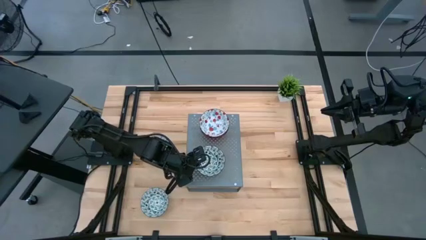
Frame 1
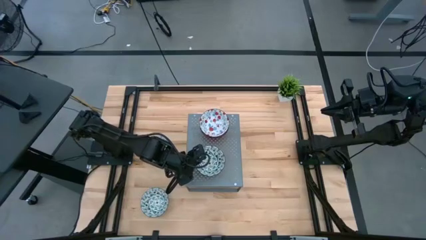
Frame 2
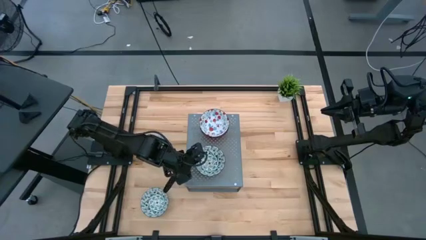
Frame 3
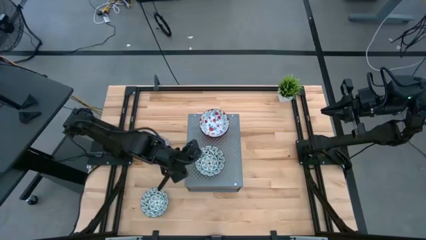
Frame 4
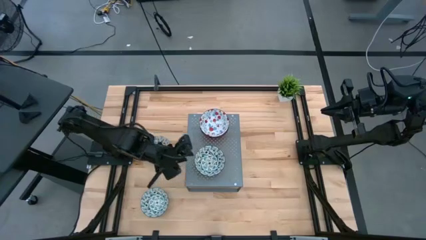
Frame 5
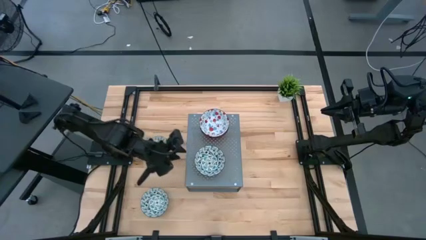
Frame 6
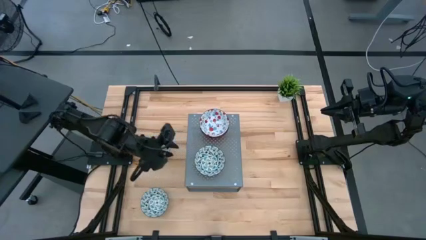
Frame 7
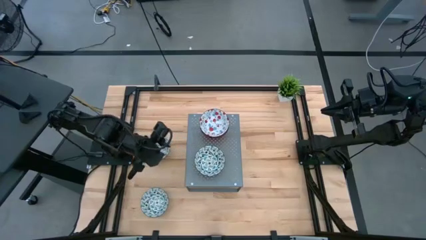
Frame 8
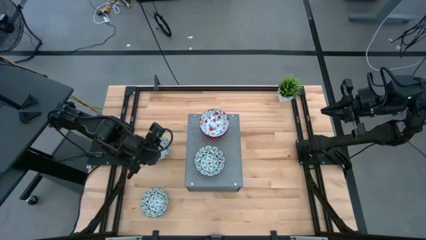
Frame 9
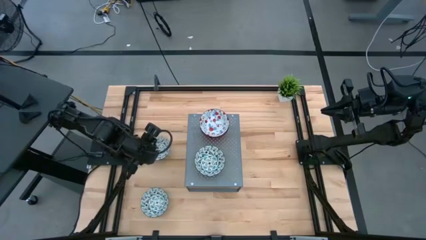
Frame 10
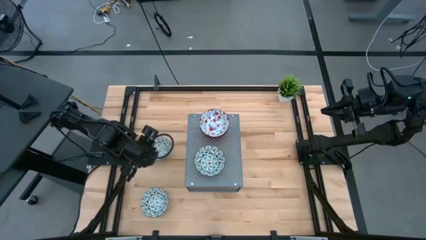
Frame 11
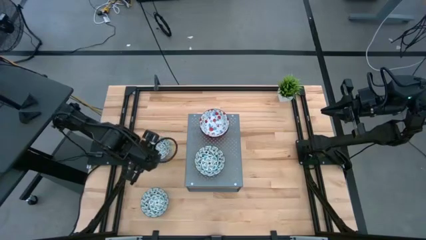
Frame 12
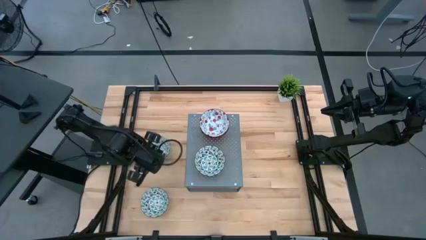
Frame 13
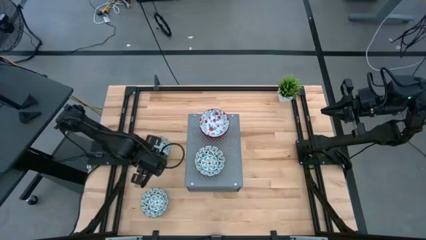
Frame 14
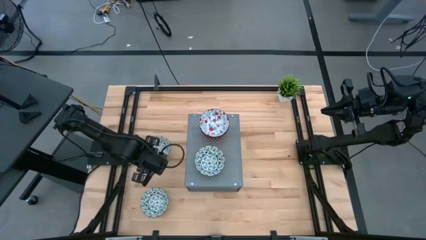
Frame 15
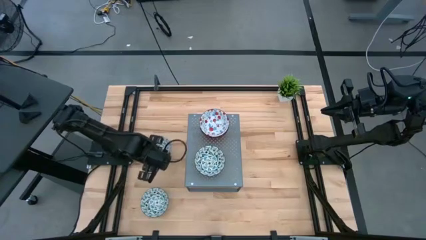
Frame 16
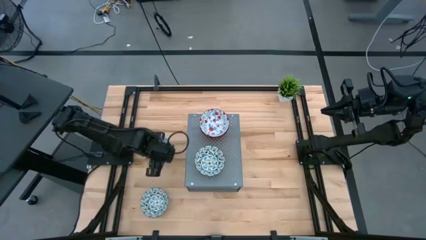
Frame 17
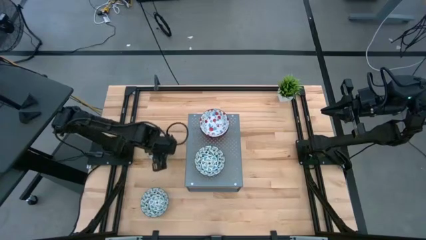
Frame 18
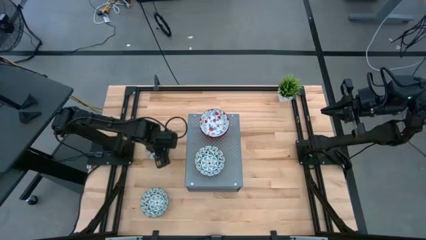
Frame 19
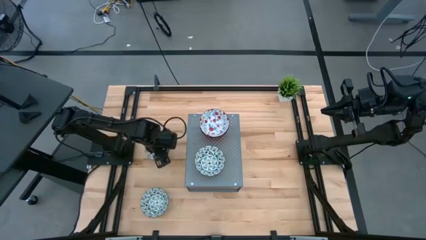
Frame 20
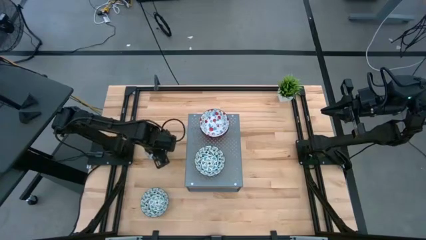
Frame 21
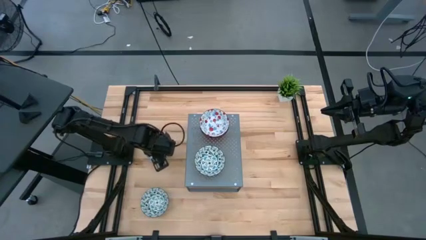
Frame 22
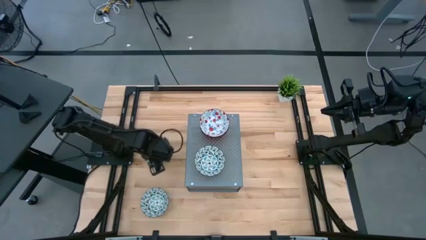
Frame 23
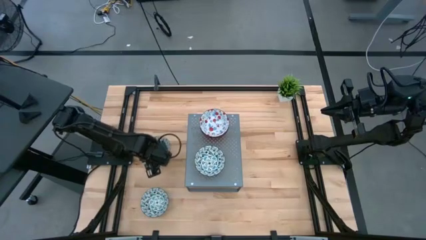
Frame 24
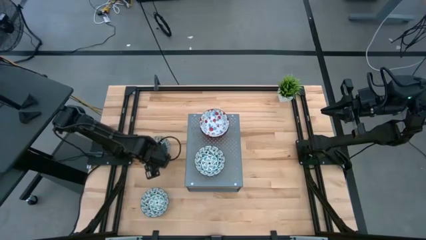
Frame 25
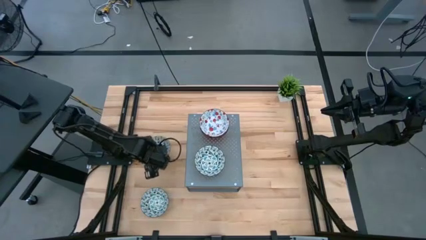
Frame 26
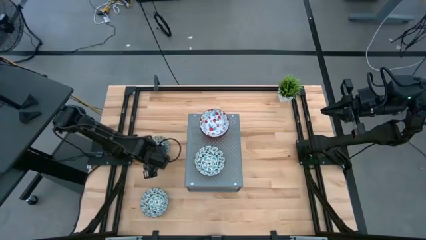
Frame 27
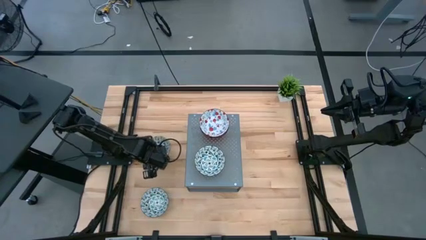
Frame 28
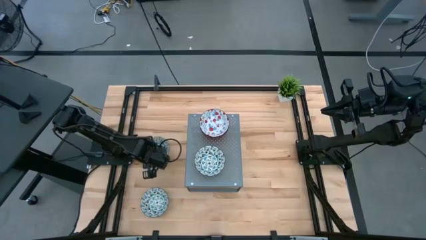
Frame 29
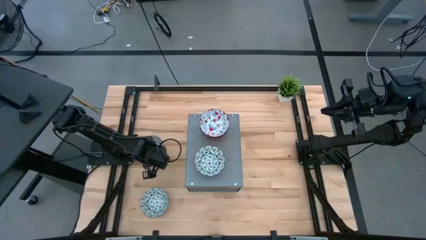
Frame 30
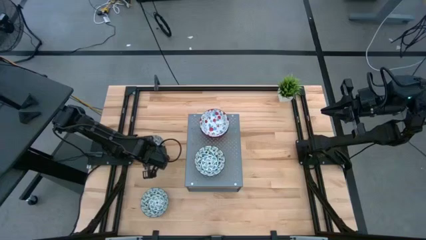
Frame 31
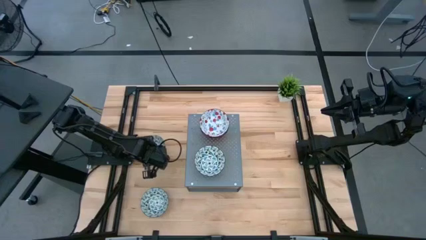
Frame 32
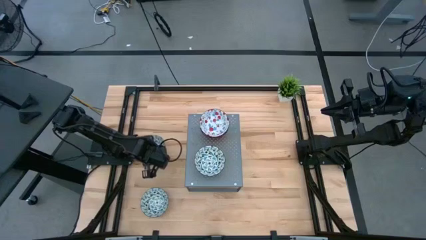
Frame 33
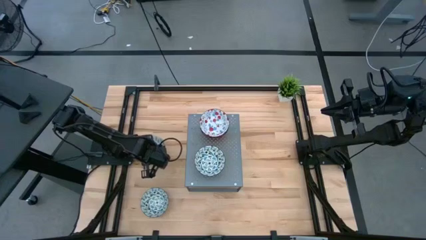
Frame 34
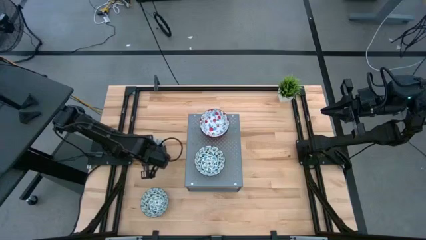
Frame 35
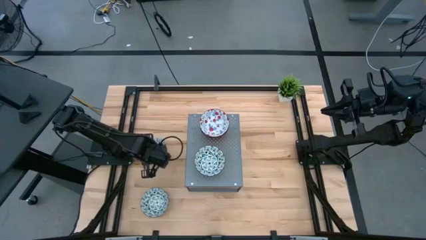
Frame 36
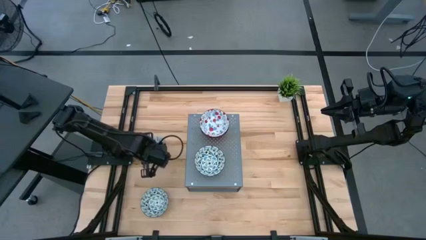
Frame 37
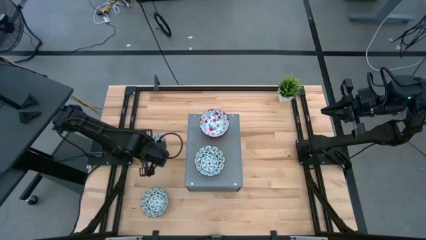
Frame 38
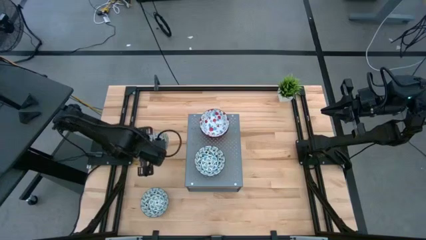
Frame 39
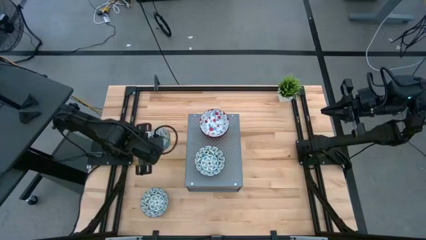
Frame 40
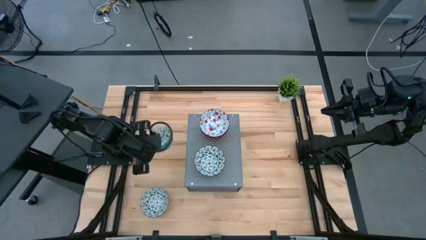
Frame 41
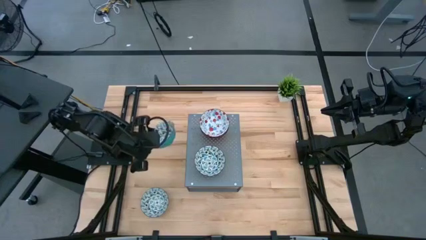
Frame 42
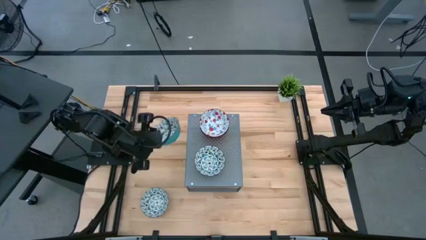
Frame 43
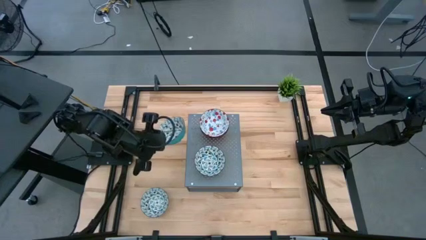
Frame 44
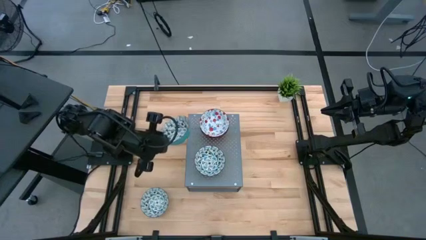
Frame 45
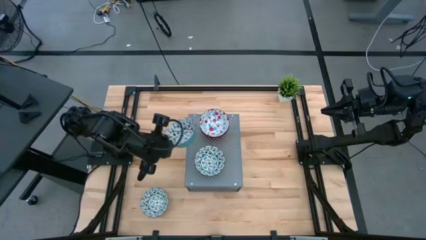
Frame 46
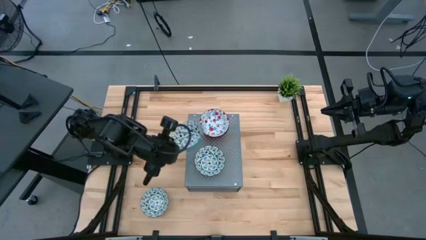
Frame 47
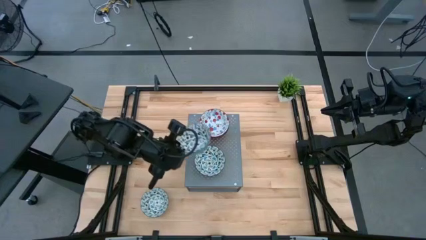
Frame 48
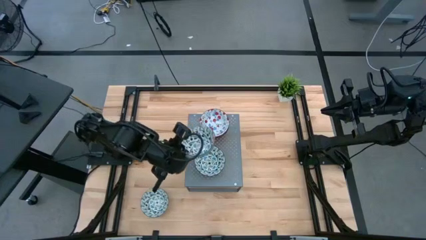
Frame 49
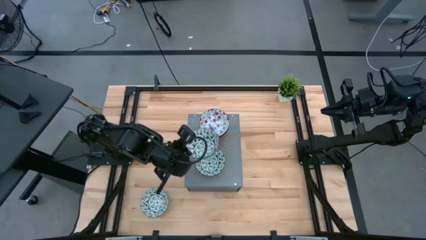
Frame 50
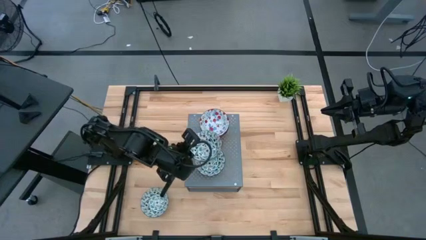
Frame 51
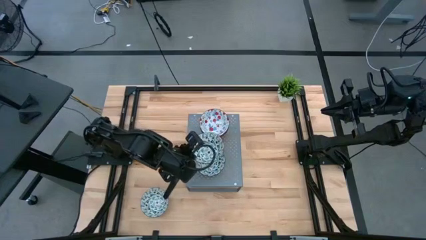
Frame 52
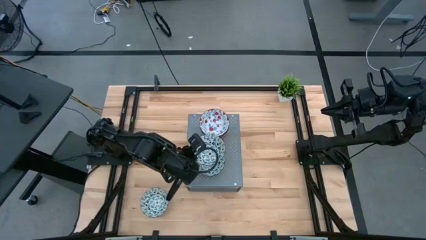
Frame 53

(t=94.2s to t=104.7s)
Task: Pick & Place Mini bowls
Put the top green bowl on top of the green bowl on the shelf

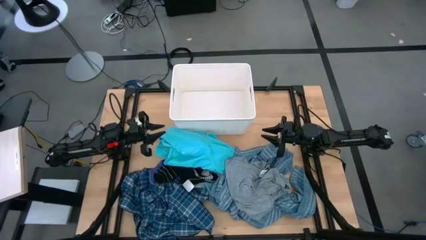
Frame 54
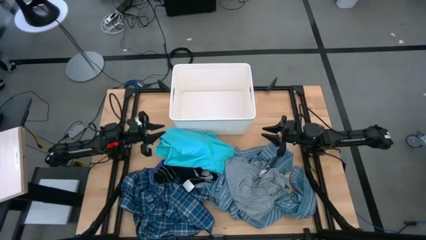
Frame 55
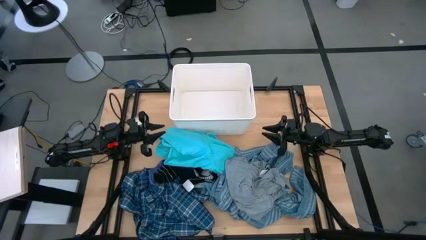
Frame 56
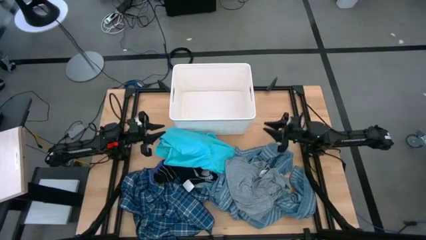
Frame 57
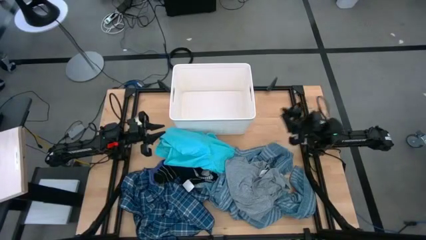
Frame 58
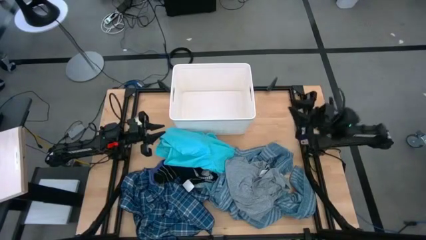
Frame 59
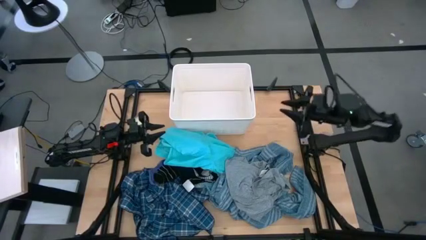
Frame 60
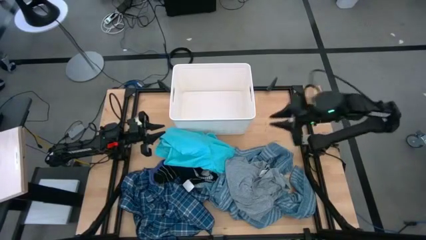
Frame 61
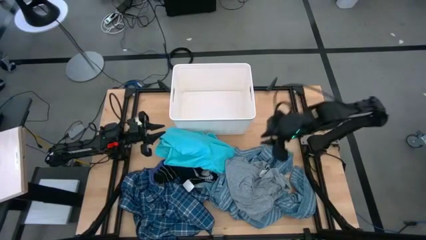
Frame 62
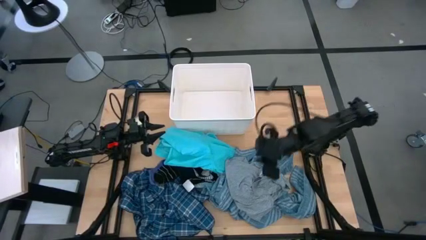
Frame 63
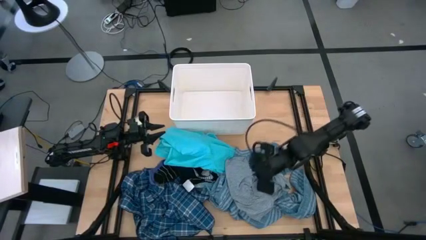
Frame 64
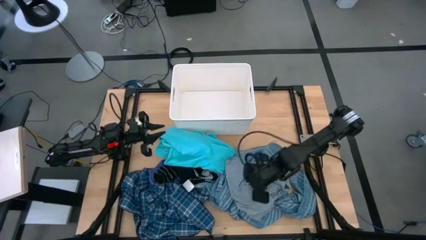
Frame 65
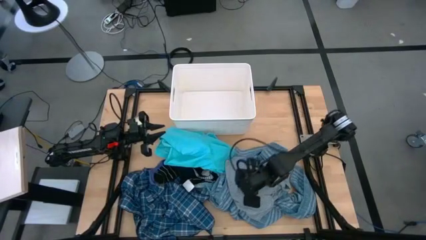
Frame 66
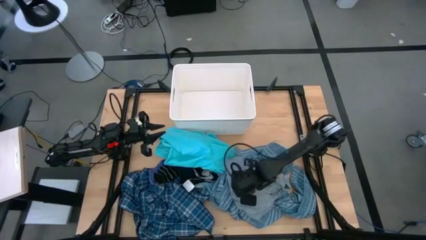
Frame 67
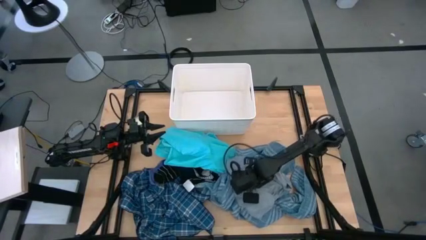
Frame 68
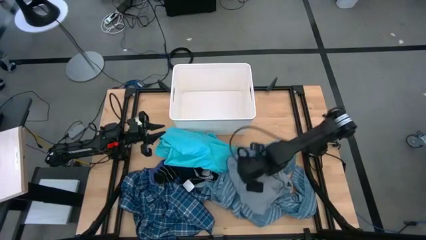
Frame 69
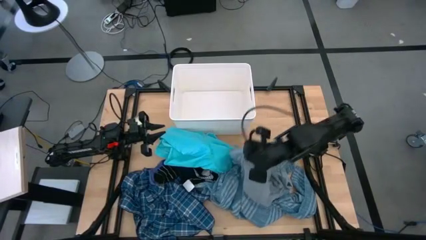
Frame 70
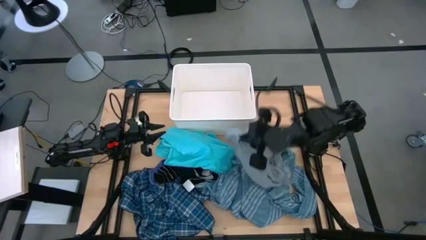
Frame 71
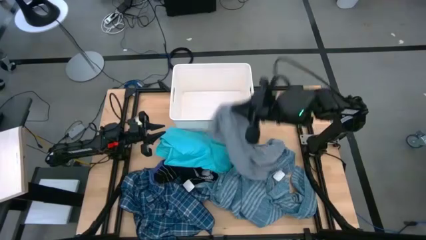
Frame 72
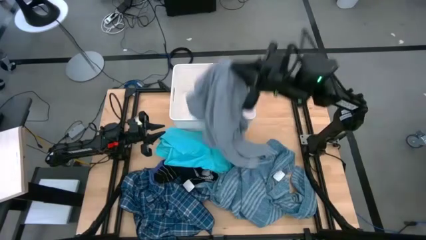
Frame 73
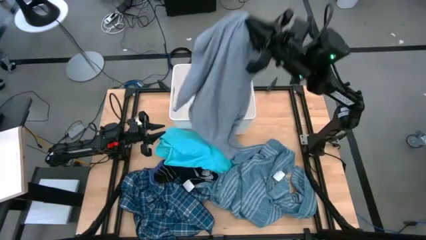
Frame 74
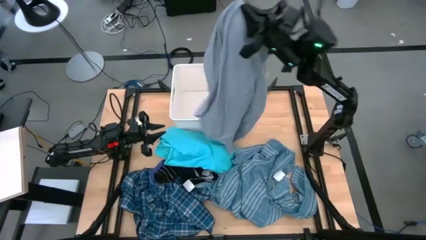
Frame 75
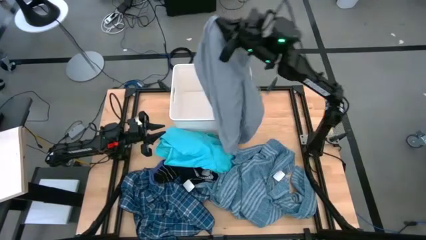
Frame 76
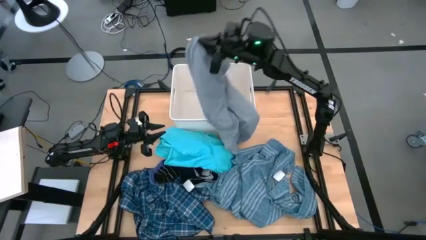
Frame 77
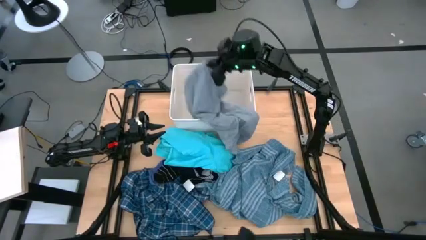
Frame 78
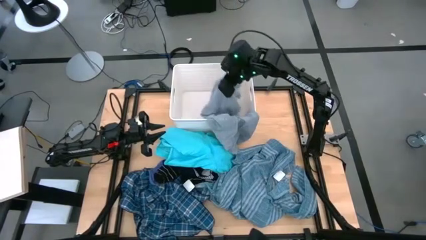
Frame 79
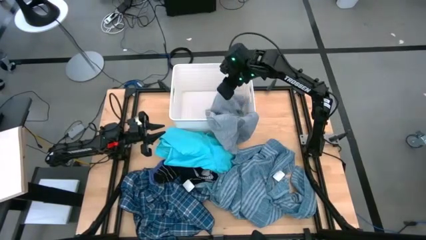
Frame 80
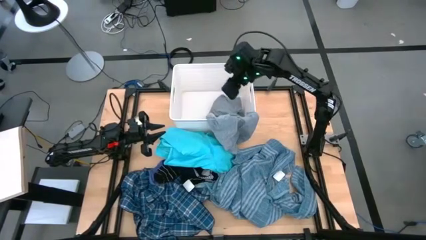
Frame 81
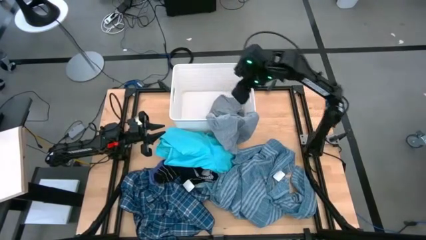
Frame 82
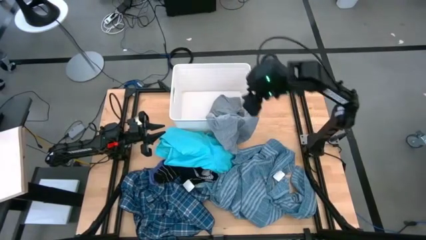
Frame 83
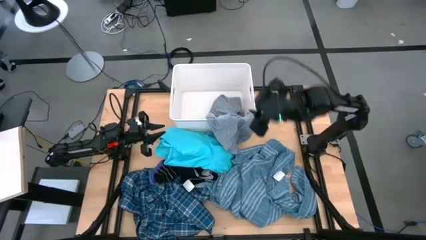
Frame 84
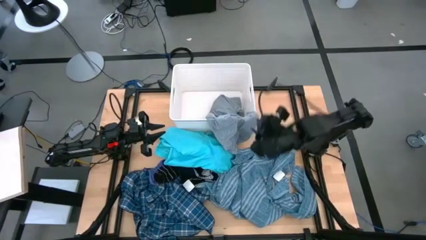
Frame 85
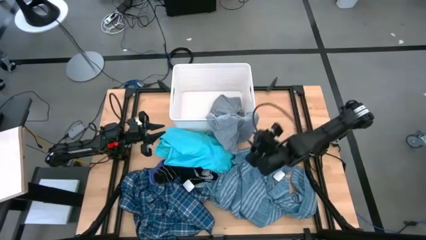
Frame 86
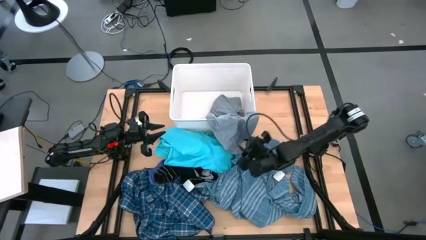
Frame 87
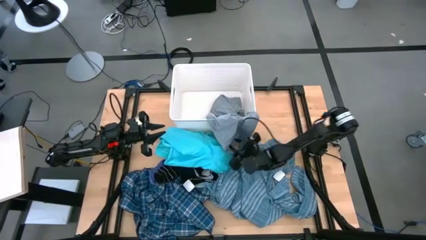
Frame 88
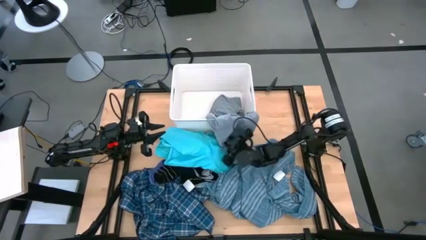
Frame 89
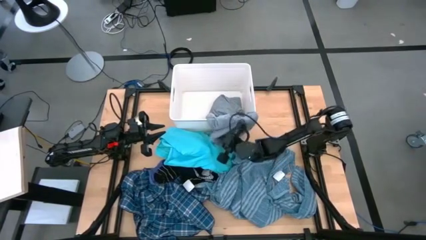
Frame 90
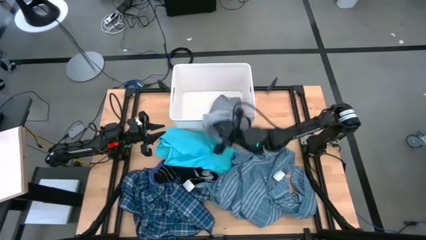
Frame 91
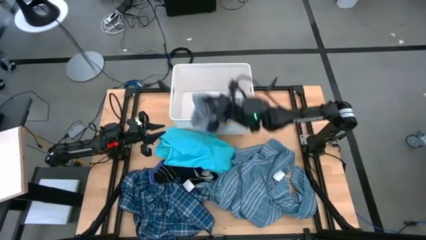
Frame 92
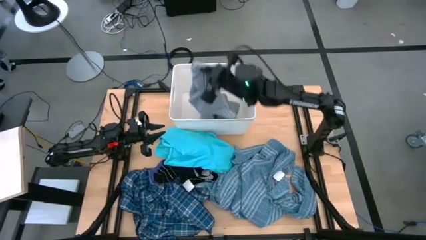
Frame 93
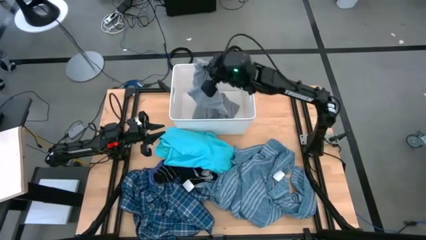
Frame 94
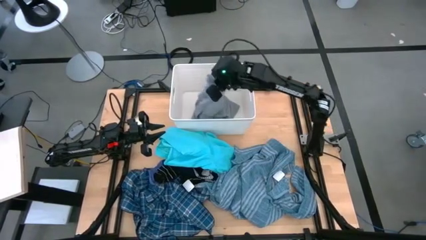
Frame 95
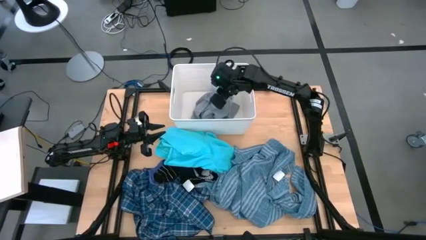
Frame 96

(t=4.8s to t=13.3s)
Task: Sort clothes
Put the gray shirt into the white bin
